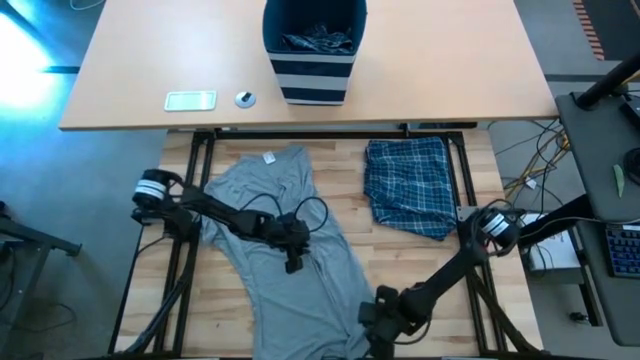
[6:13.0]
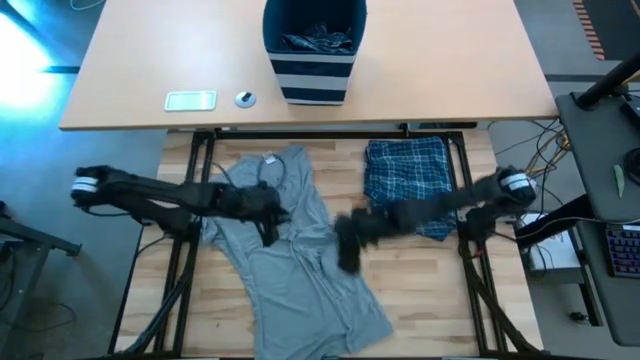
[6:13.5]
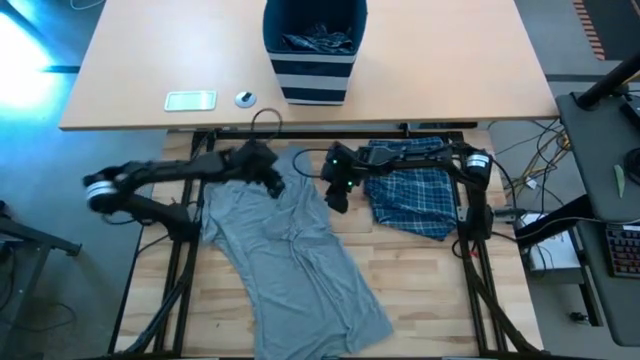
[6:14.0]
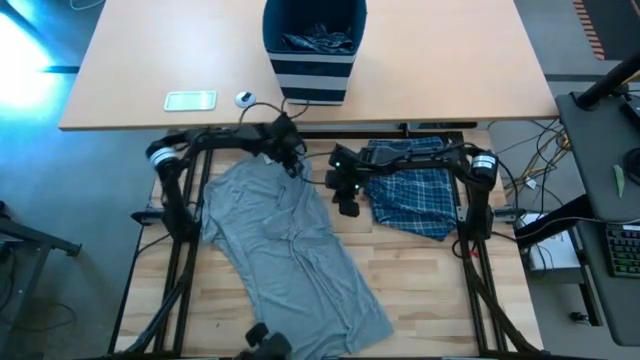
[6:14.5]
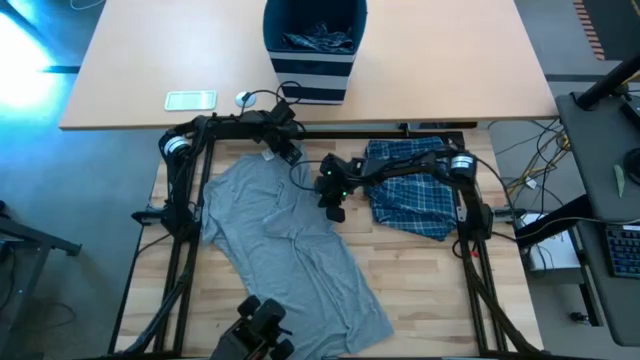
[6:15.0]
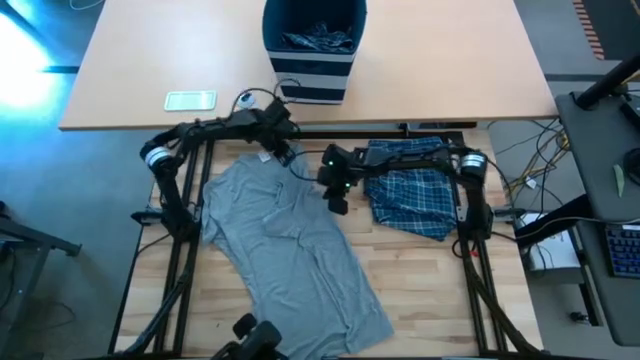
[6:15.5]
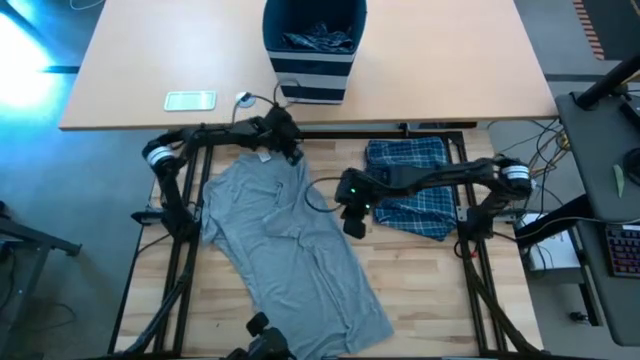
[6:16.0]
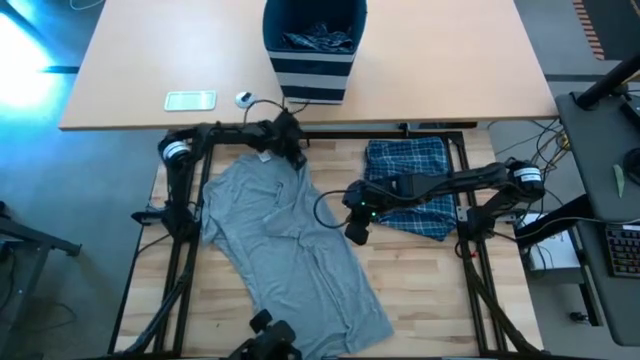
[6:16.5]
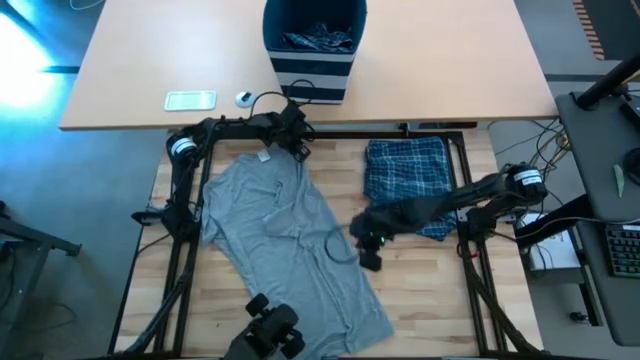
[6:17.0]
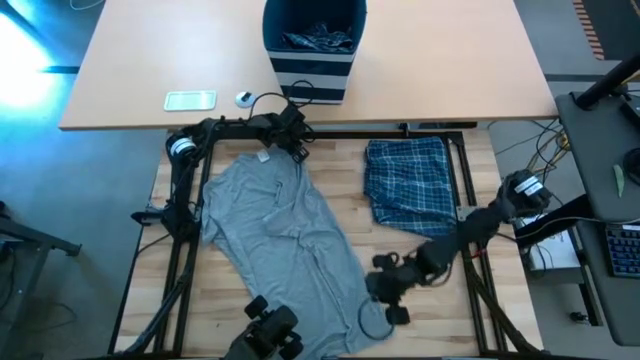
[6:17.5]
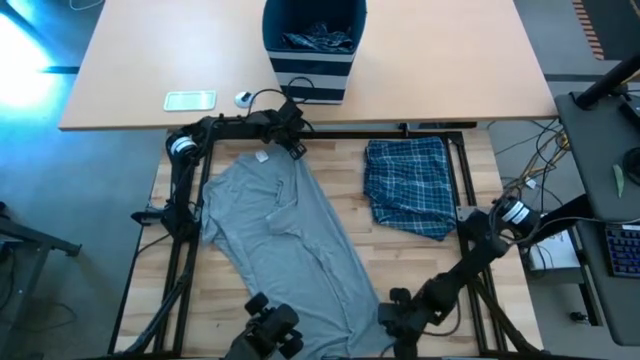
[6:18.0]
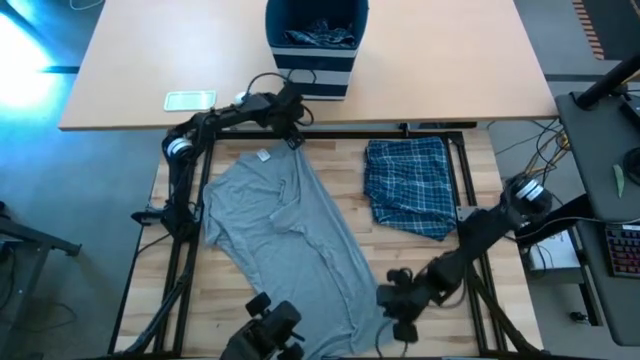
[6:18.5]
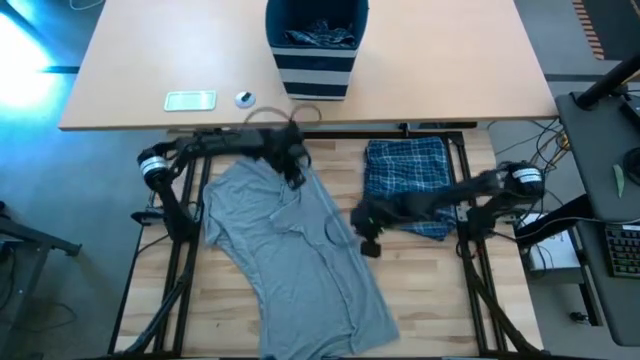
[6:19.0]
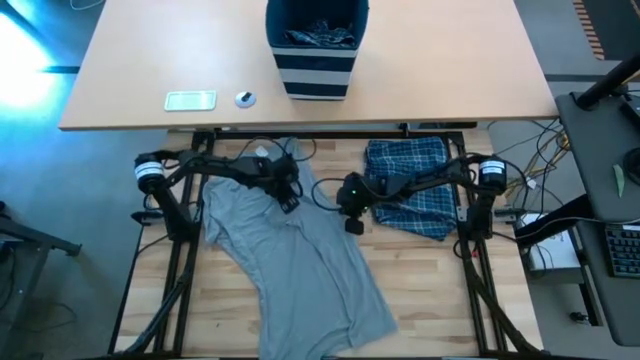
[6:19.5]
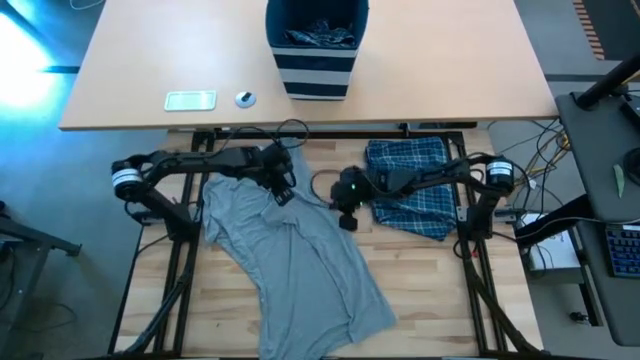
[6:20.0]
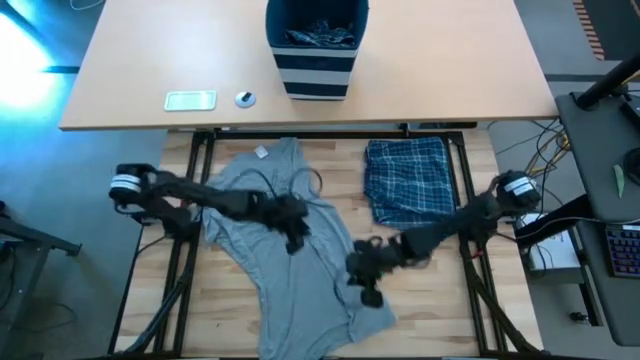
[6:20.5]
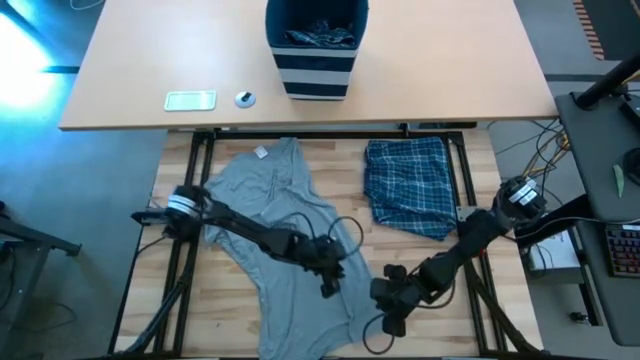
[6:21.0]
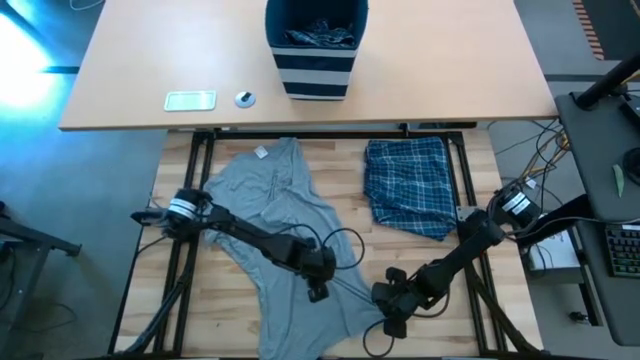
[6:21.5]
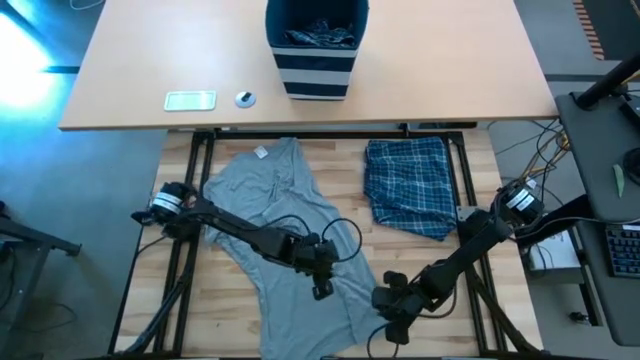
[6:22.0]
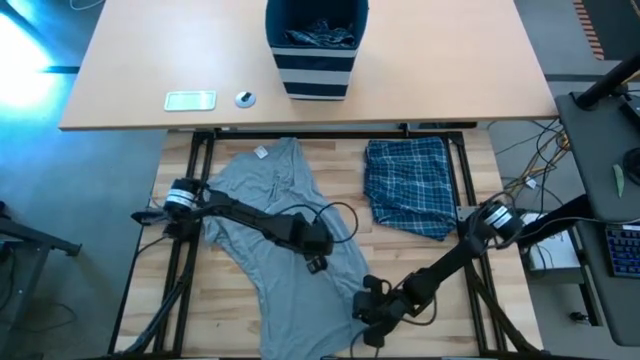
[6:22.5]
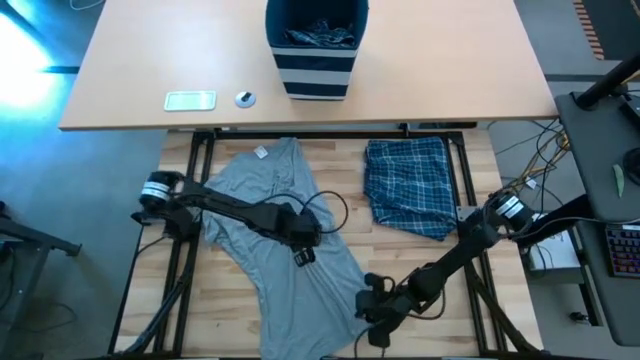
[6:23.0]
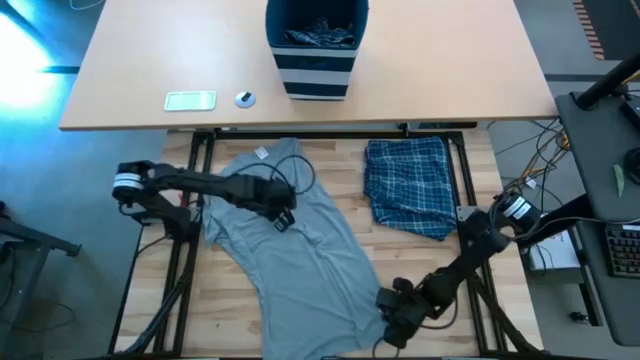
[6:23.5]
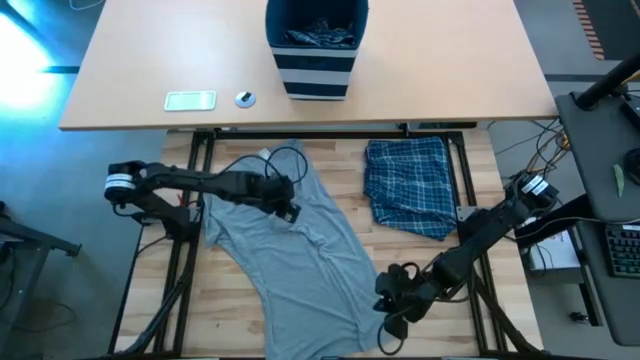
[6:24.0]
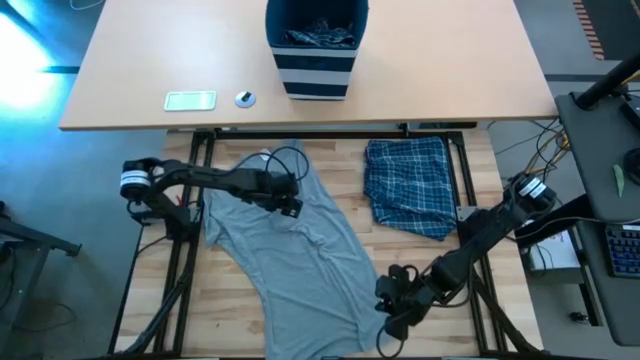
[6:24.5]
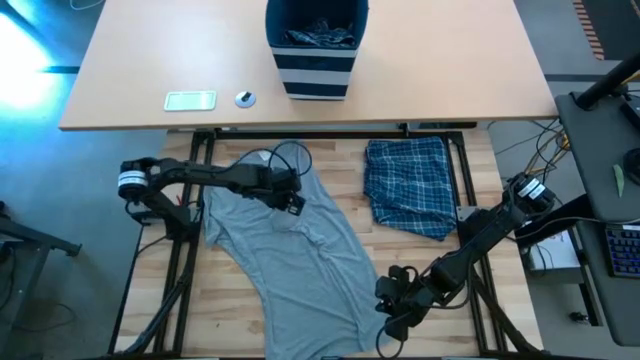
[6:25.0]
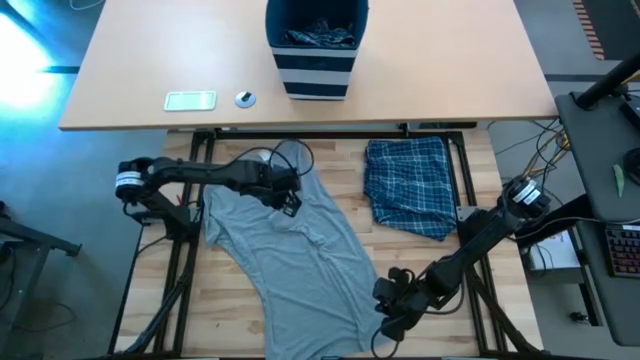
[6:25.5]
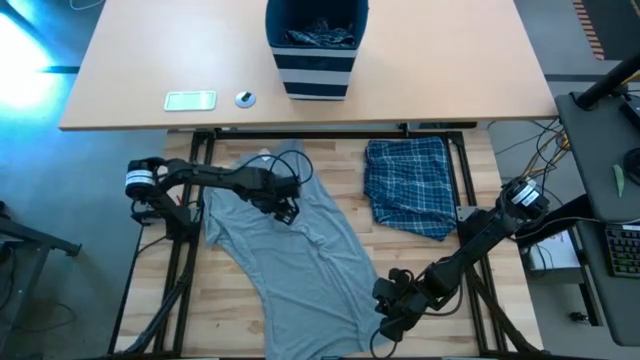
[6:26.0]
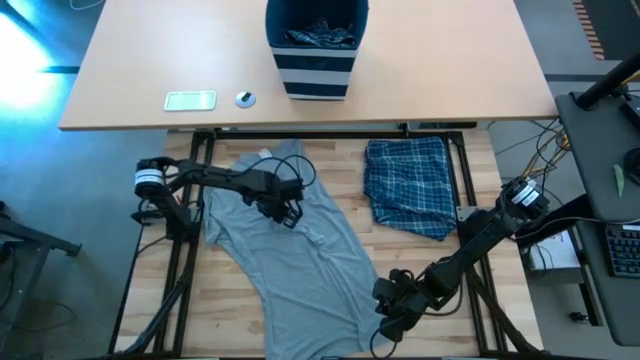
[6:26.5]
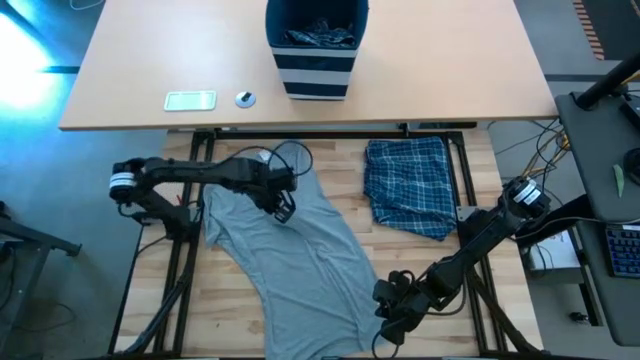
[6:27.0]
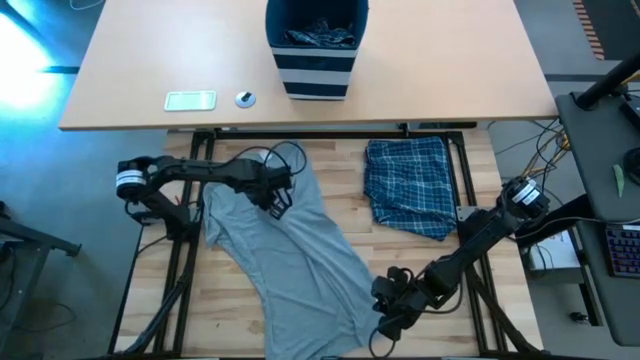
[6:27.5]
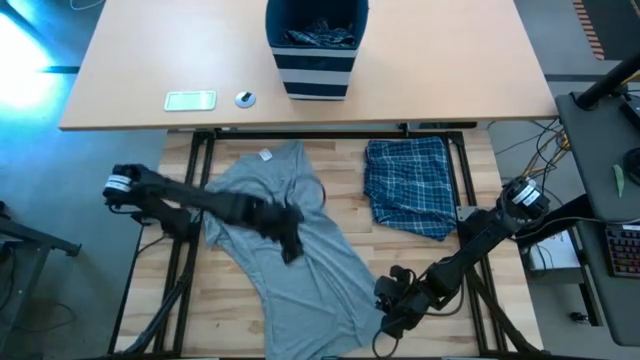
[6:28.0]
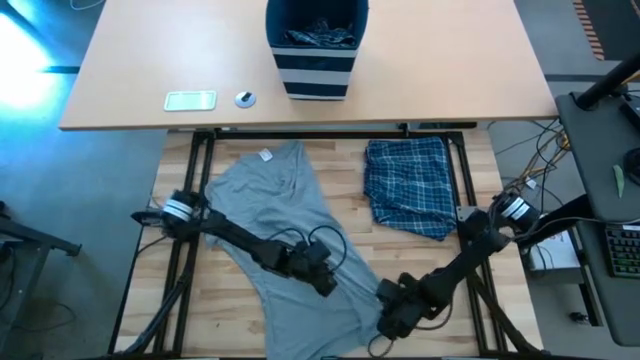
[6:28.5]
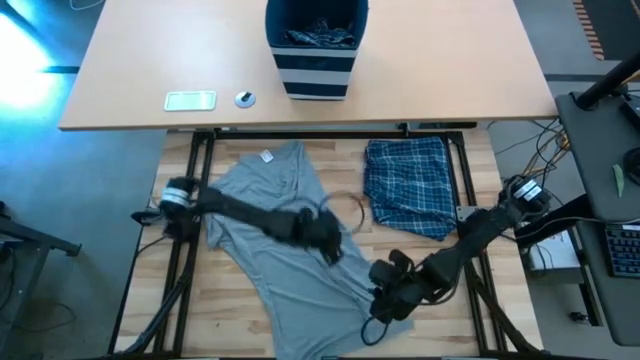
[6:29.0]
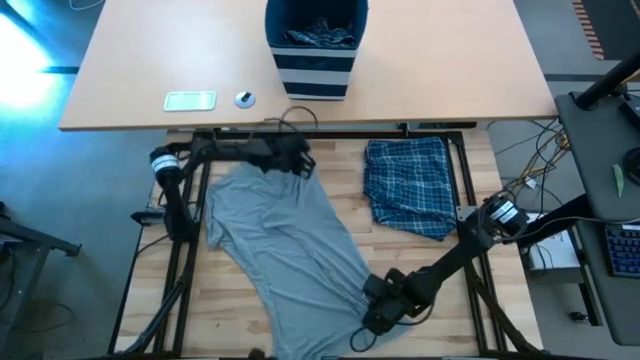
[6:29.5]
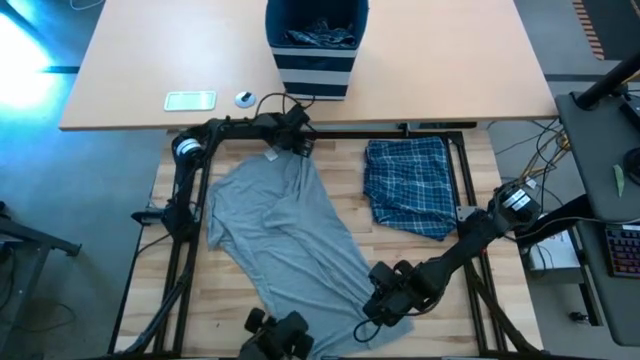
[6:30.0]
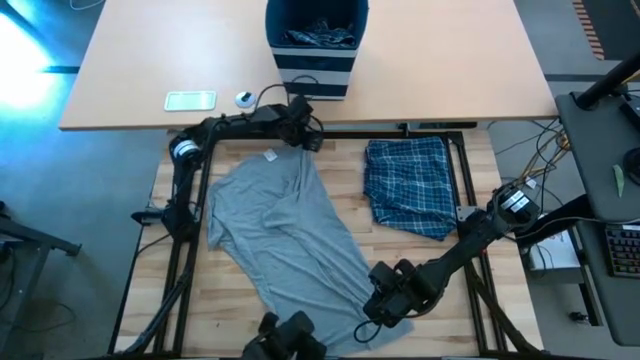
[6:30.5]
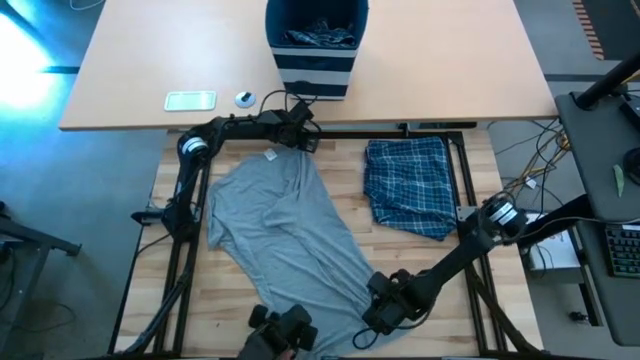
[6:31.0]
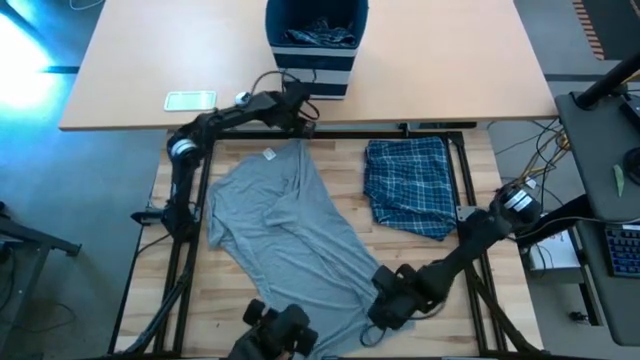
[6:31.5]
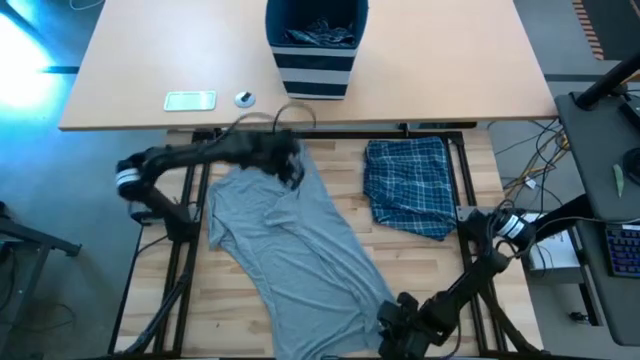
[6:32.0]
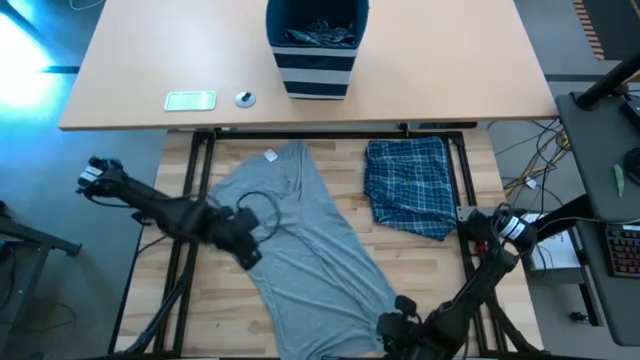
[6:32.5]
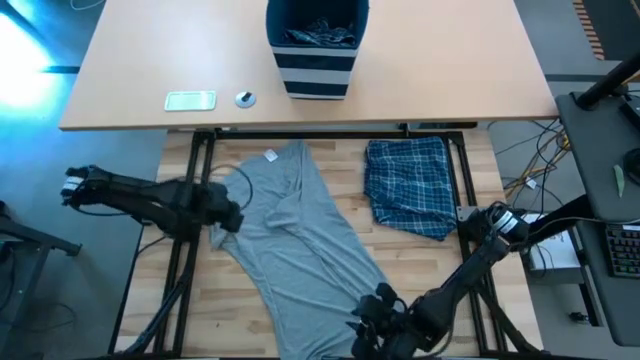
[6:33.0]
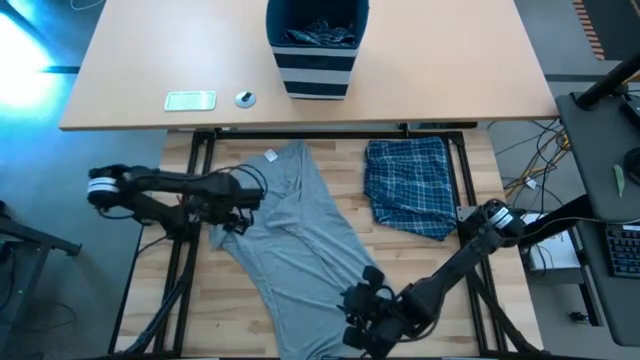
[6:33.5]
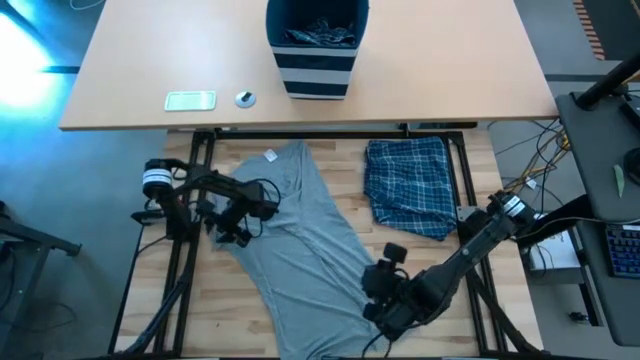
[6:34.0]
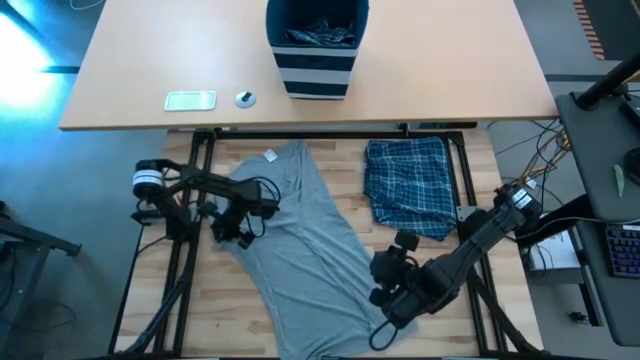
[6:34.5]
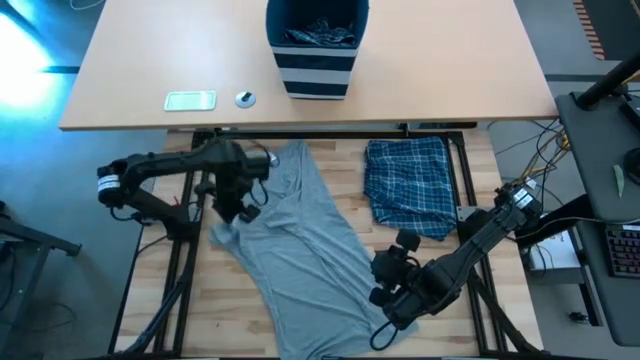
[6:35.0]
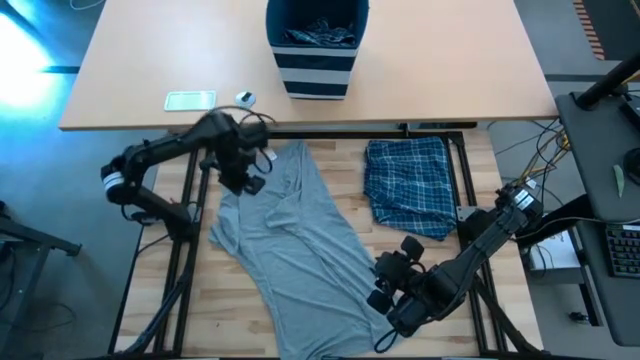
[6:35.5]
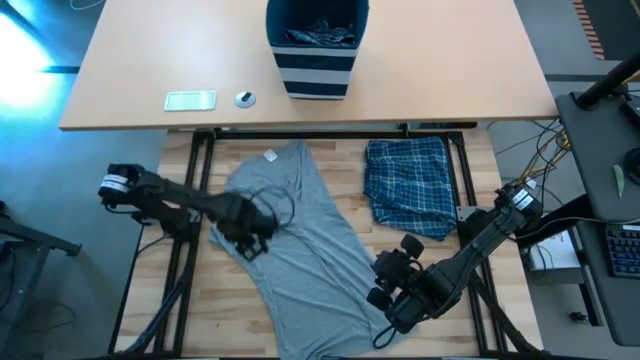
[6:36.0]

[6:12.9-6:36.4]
Task: Fold Laundry from Bin
Fold the gray shirt
